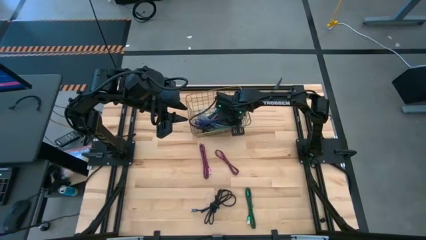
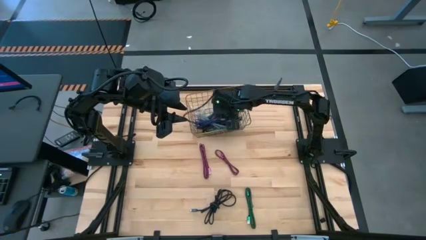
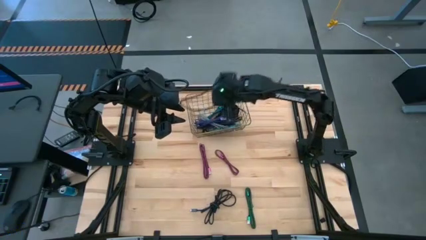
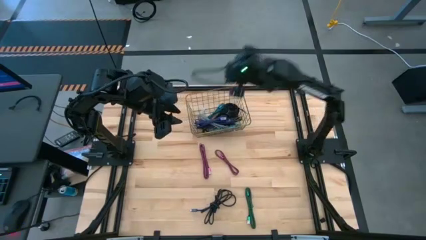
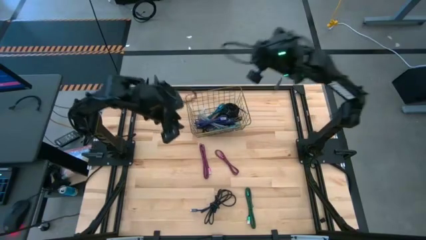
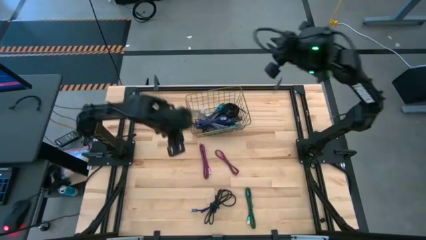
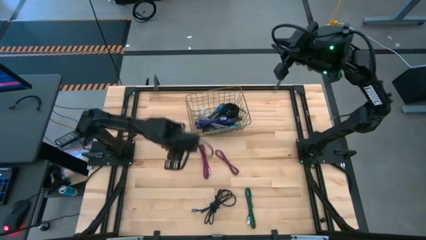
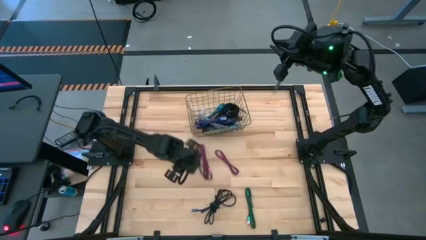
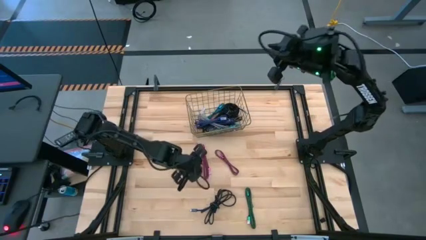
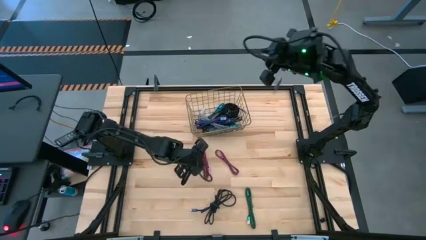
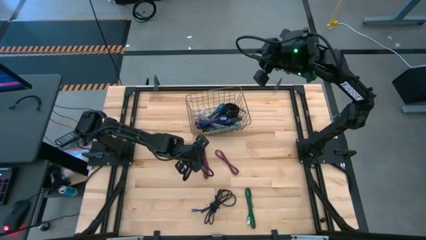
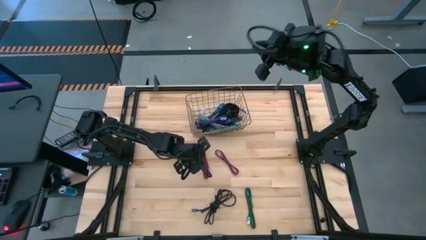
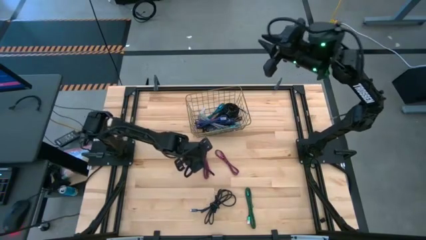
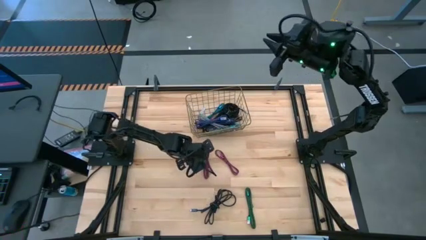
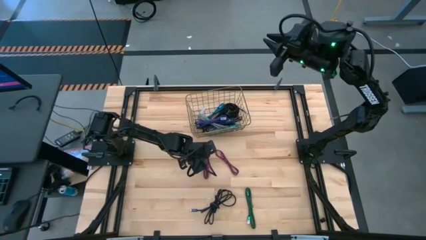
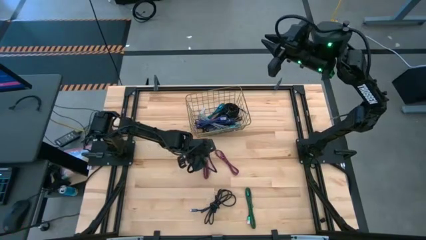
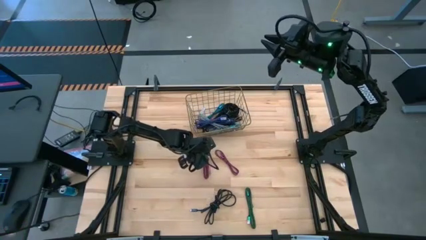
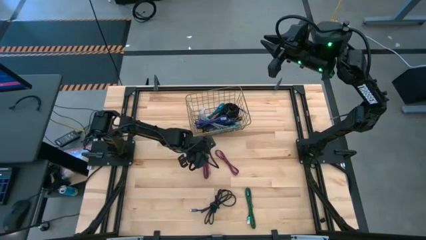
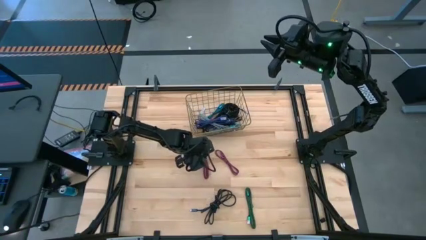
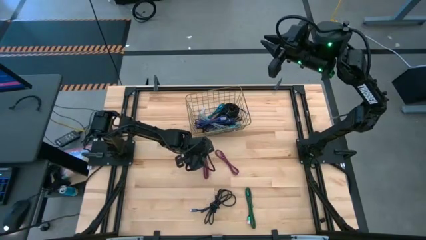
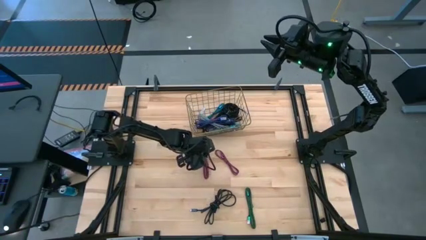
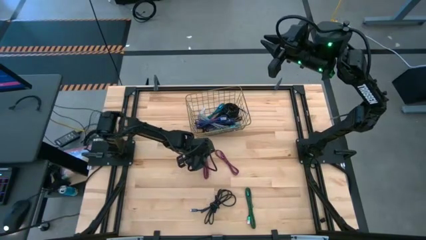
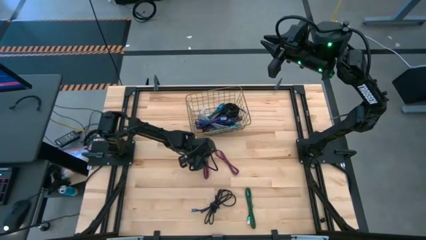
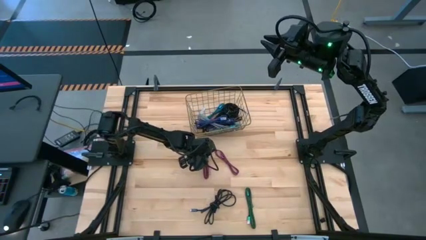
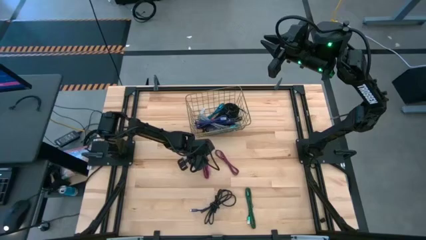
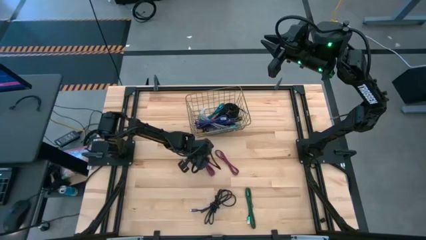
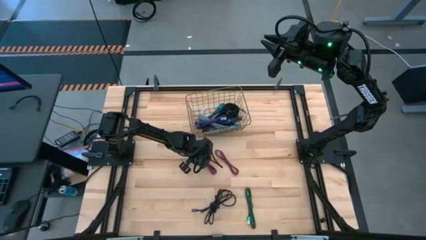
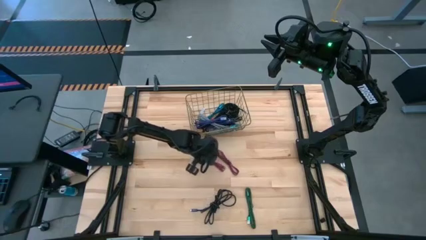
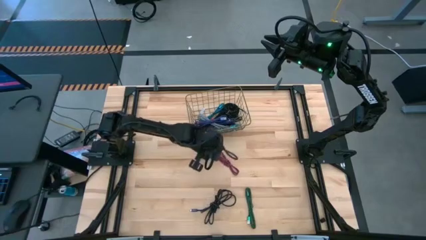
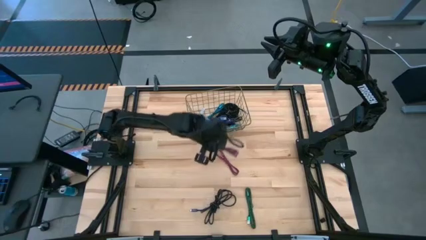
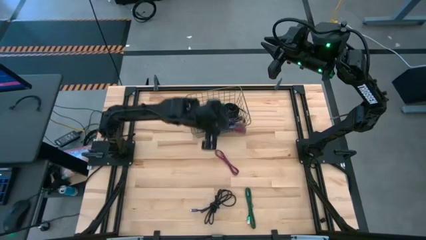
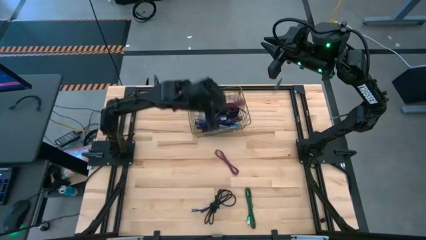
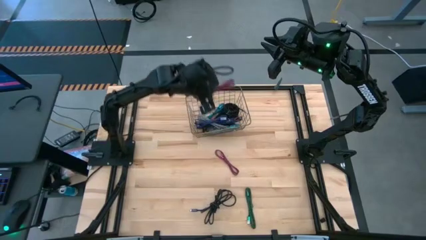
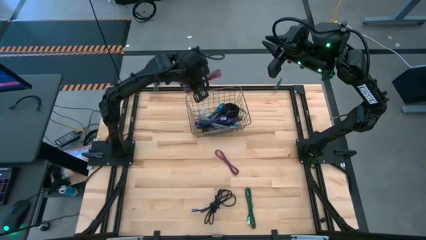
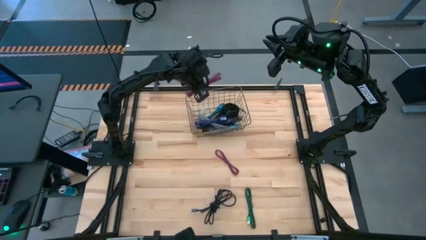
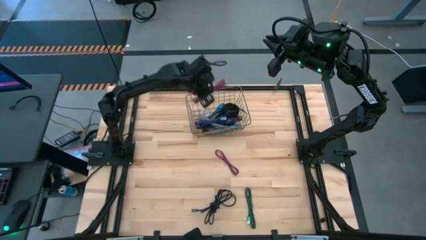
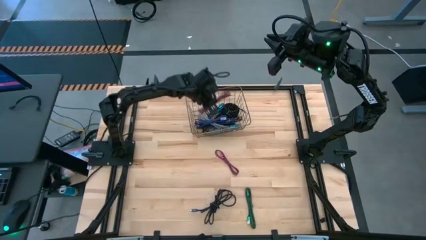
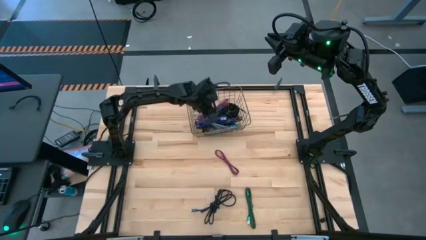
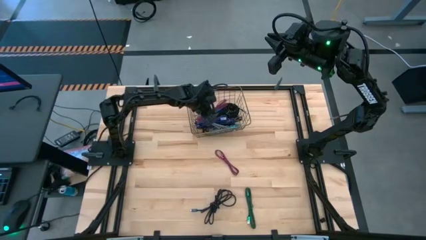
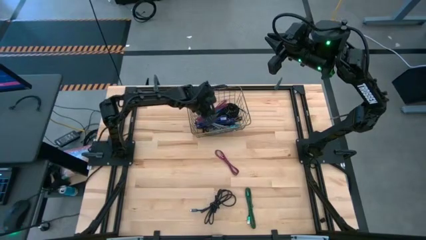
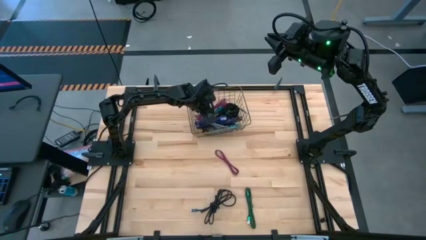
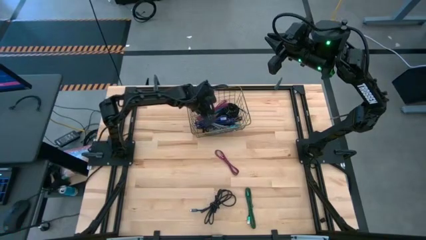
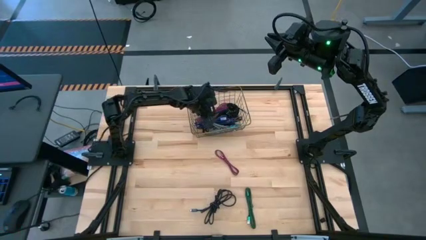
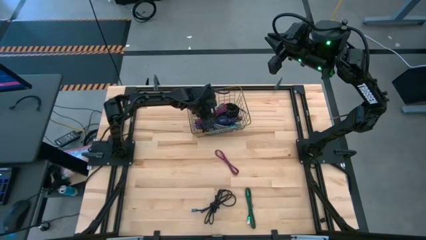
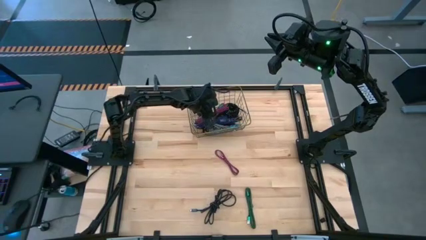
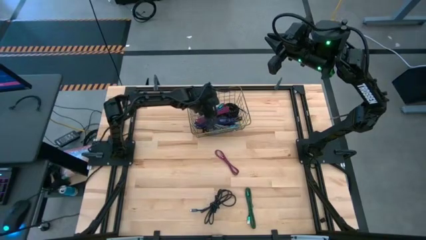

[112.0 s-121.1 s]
Task: Pick and place USB-C Cables
Put the pink charger cable into the wire basket

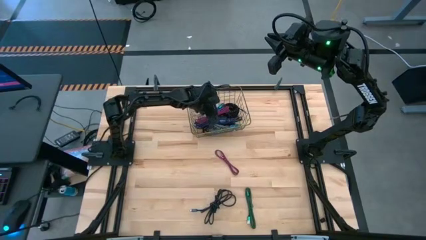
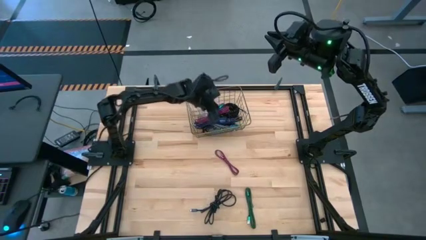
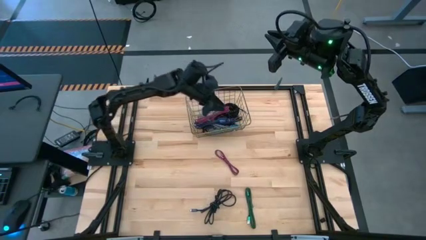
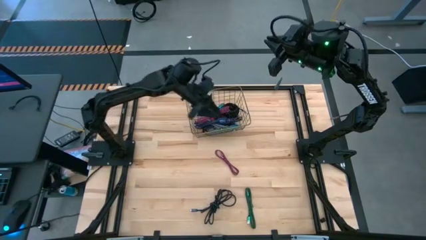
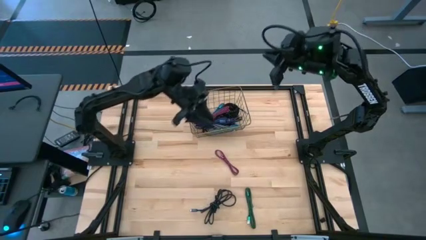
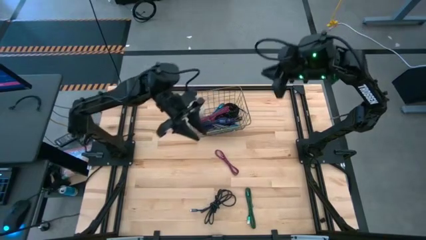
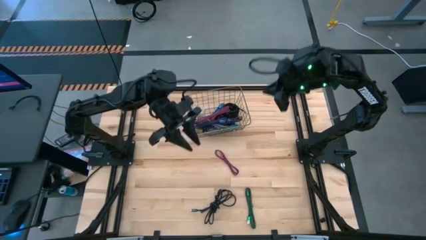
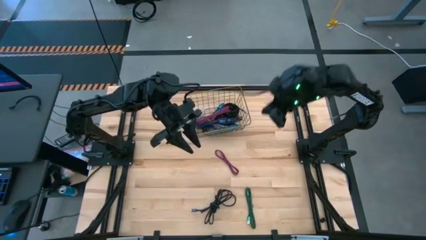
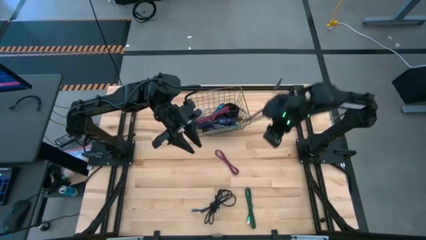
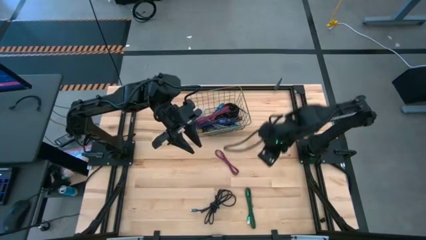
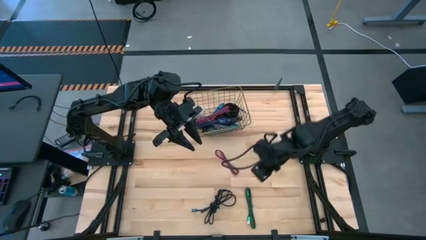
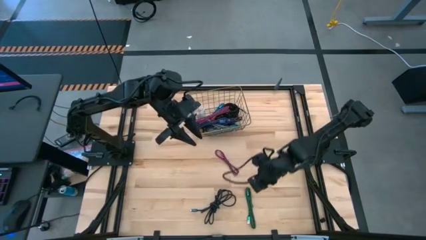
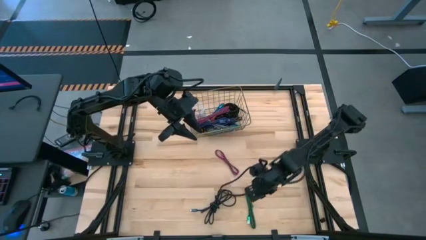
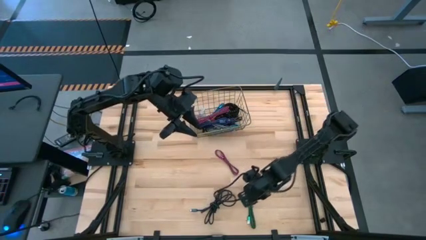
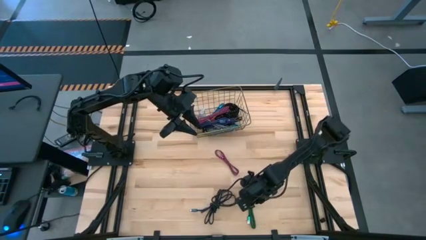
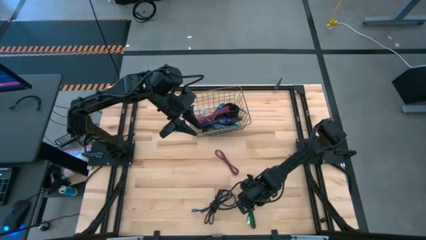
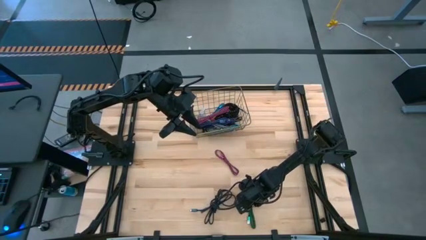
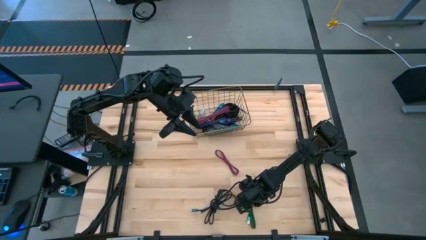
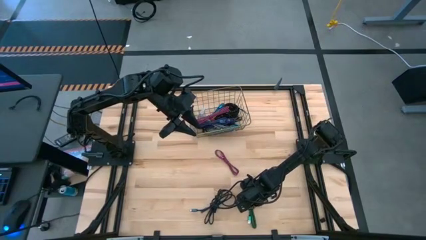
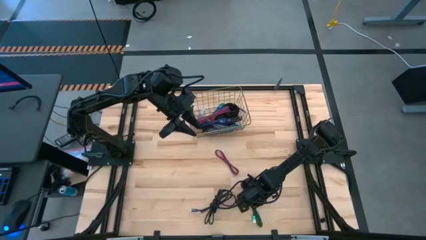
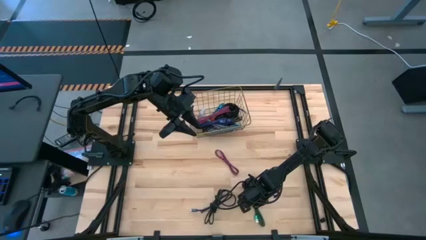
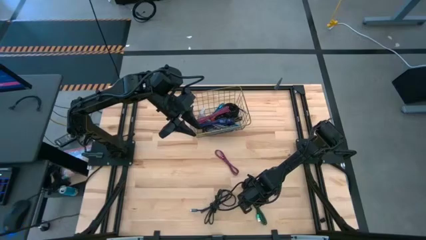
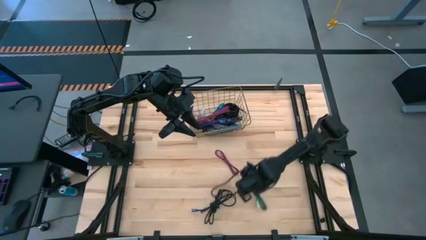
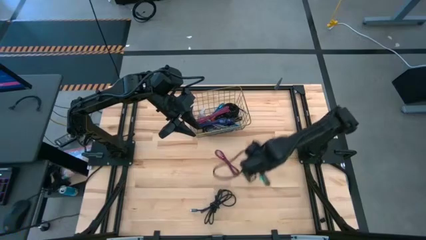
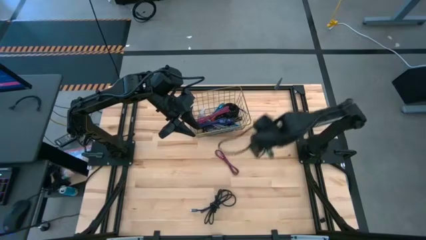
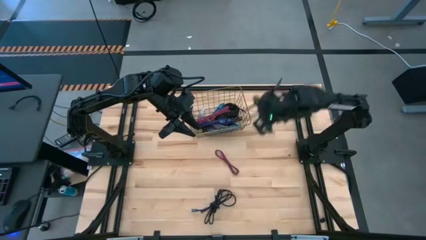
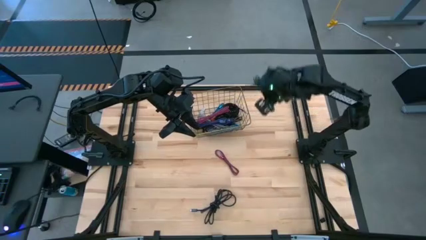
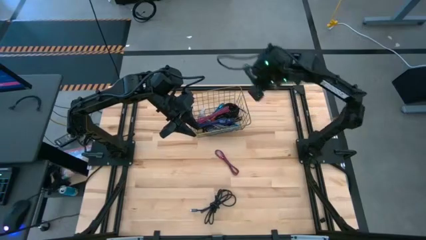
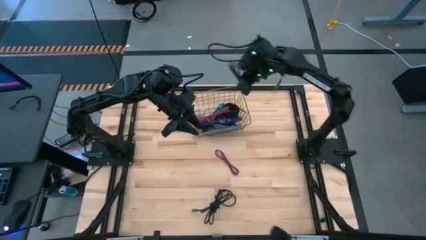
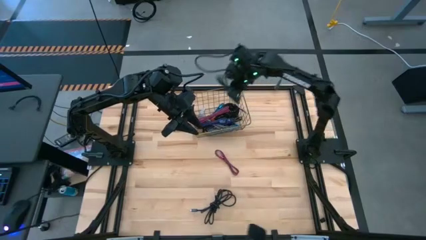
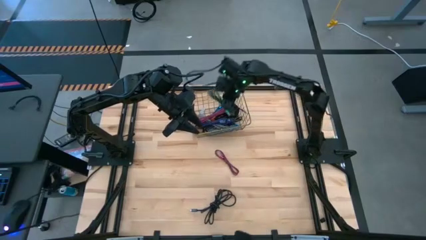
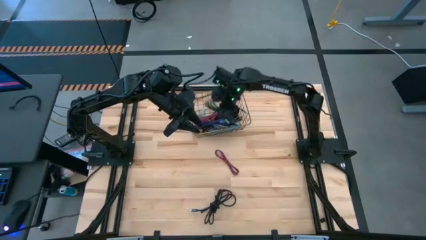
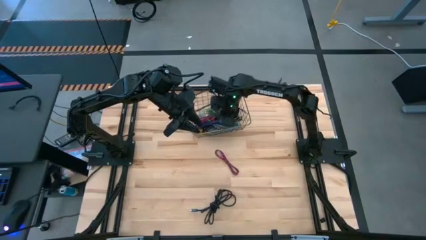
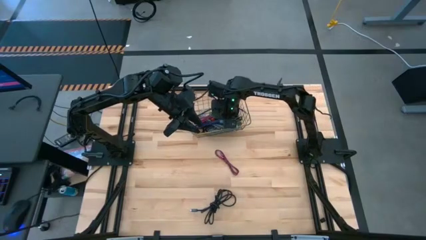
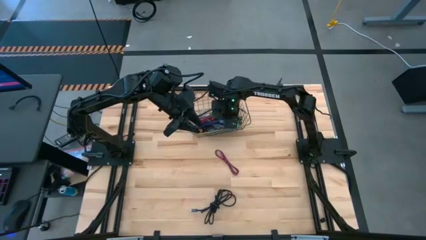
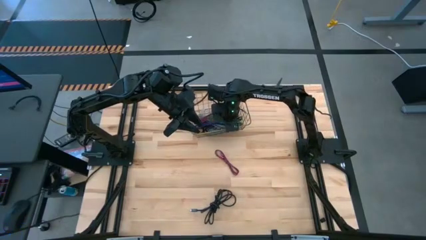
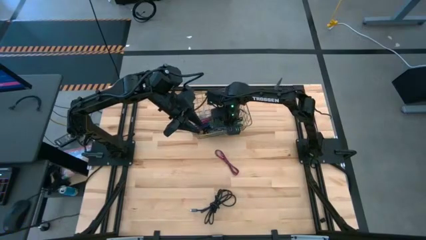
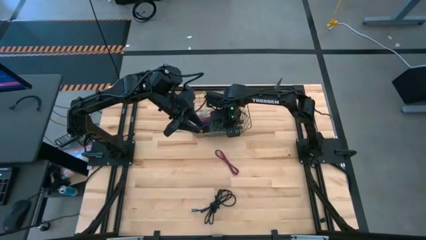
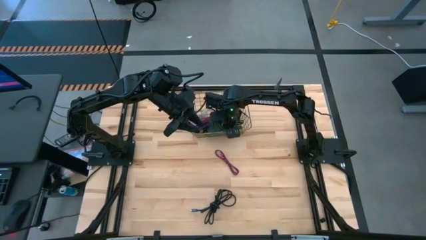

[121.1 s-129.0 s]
Put the green charger cable into the wire basket
